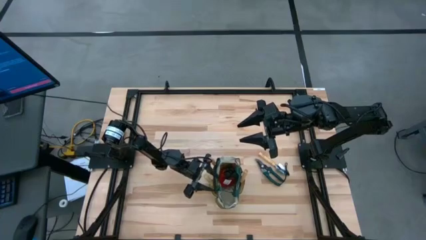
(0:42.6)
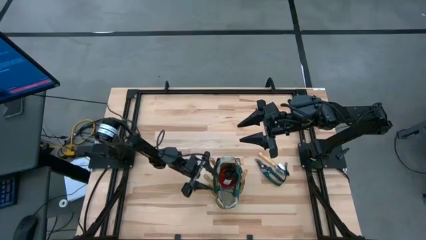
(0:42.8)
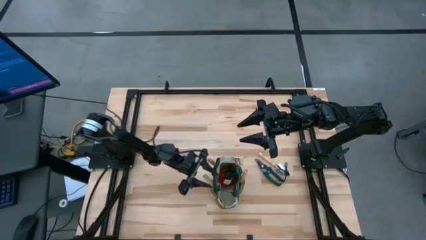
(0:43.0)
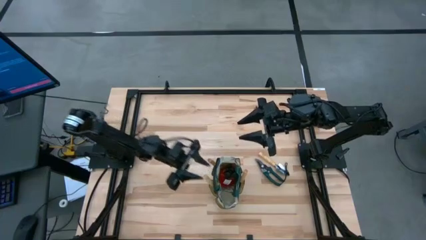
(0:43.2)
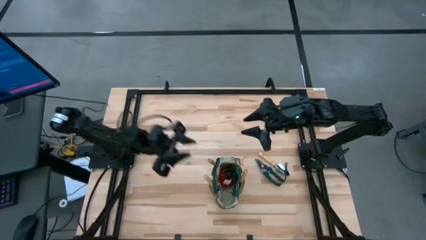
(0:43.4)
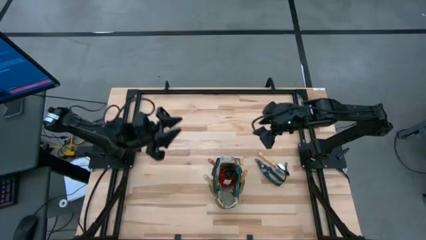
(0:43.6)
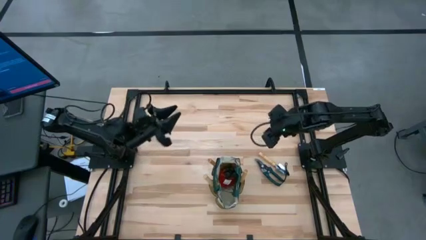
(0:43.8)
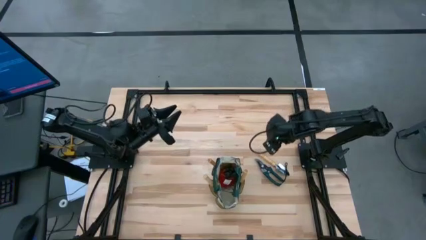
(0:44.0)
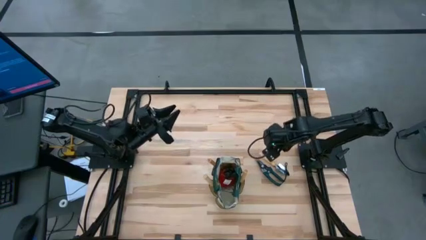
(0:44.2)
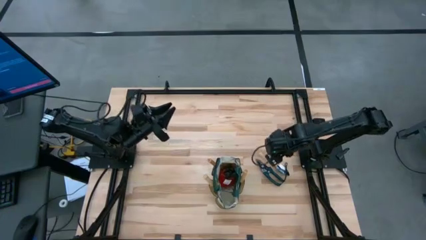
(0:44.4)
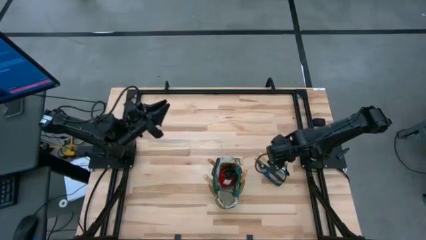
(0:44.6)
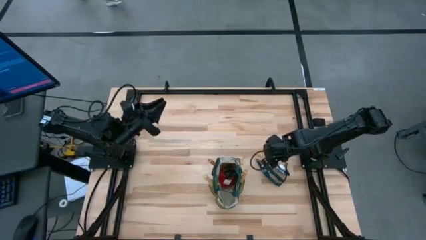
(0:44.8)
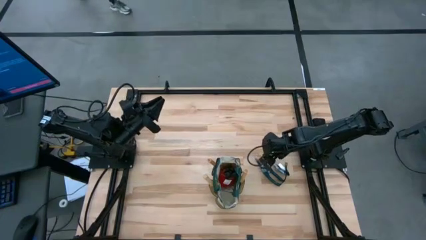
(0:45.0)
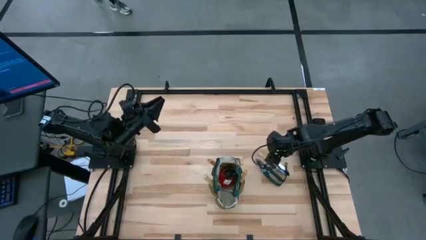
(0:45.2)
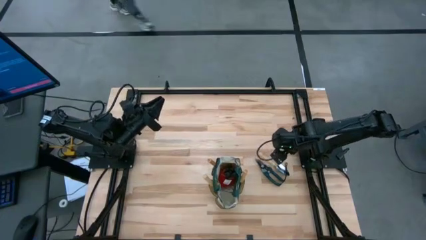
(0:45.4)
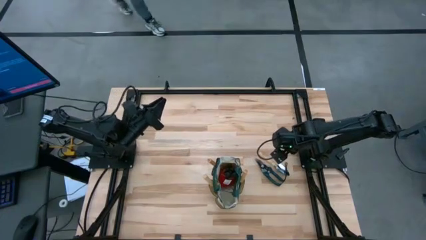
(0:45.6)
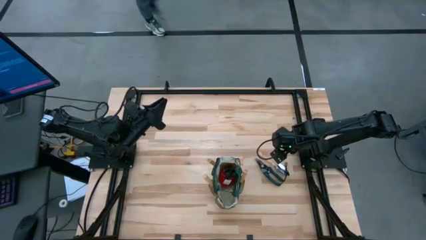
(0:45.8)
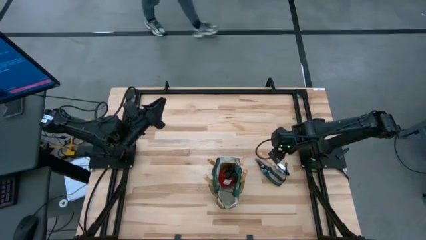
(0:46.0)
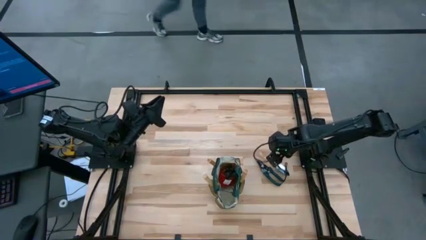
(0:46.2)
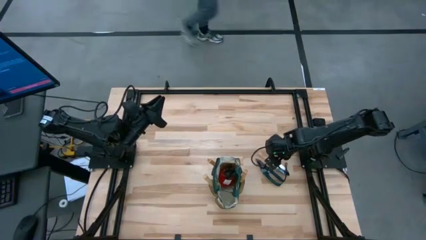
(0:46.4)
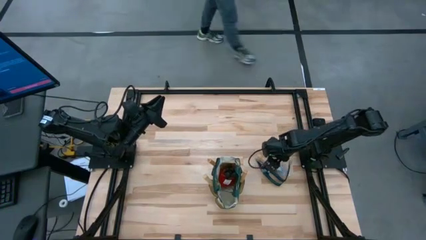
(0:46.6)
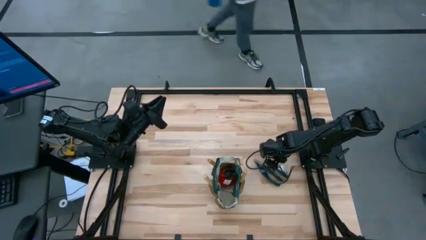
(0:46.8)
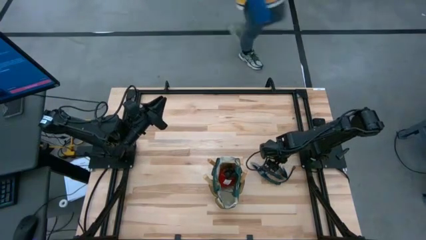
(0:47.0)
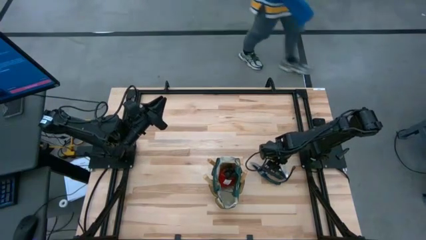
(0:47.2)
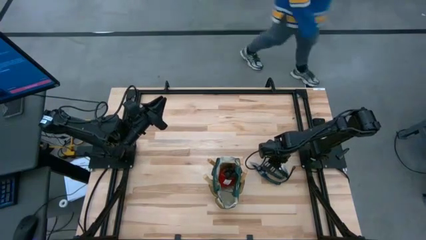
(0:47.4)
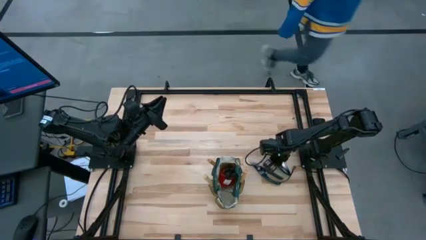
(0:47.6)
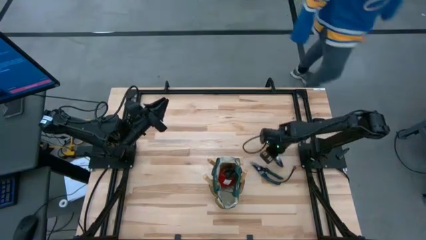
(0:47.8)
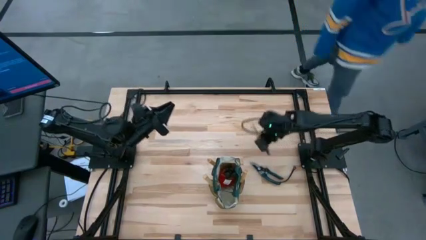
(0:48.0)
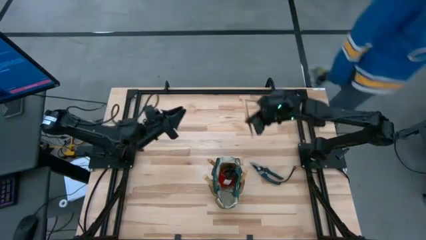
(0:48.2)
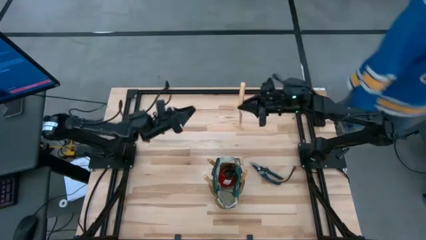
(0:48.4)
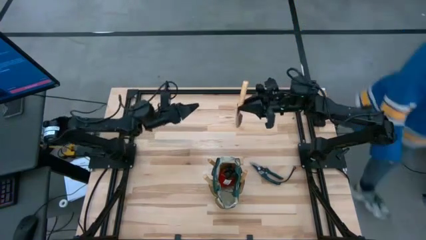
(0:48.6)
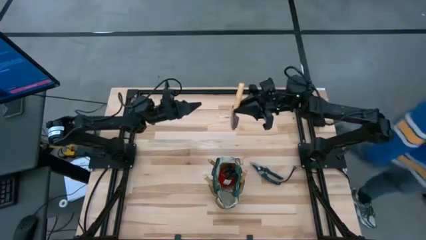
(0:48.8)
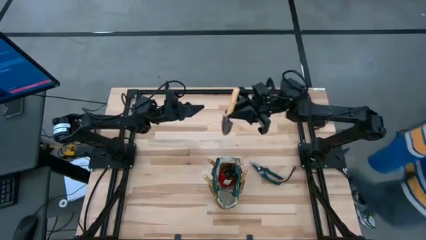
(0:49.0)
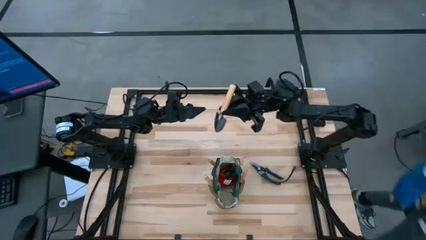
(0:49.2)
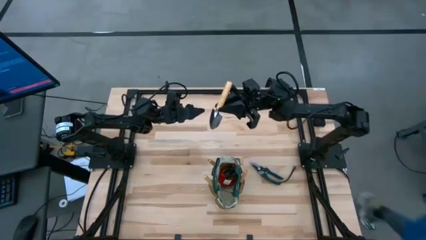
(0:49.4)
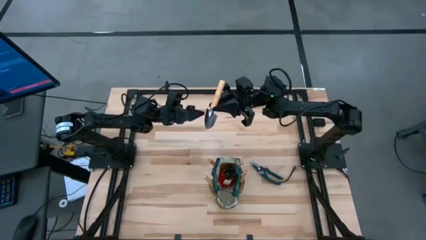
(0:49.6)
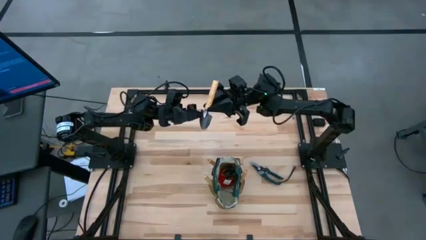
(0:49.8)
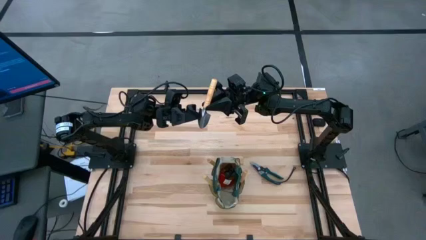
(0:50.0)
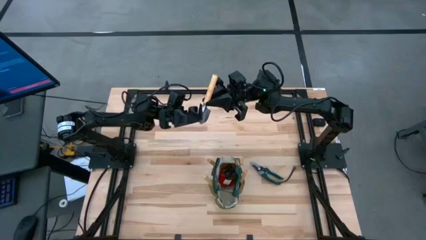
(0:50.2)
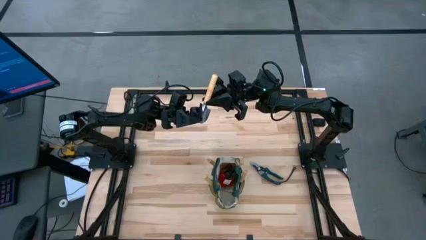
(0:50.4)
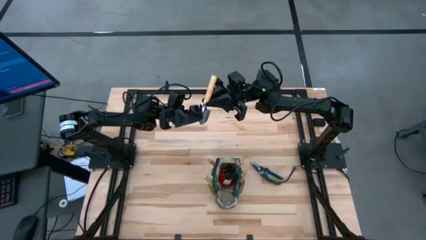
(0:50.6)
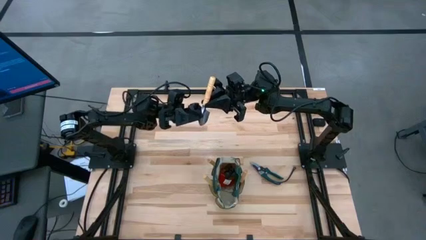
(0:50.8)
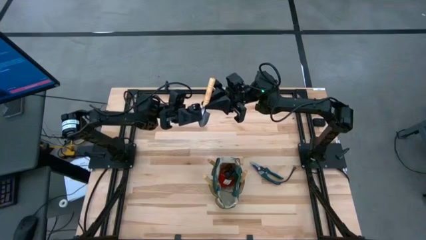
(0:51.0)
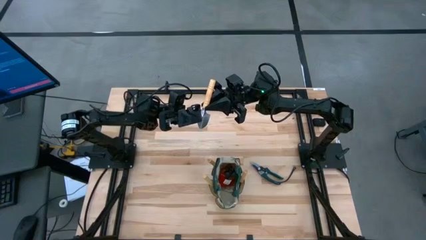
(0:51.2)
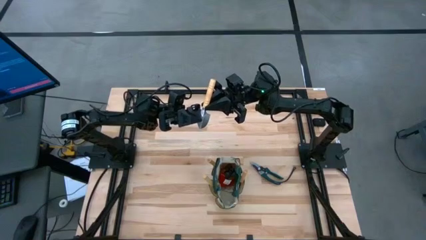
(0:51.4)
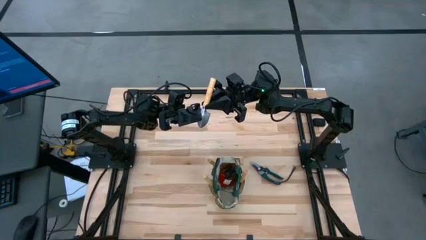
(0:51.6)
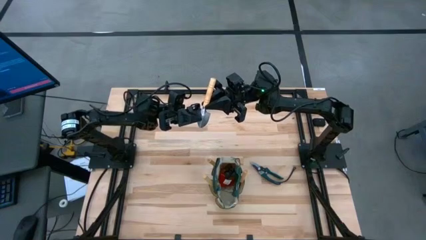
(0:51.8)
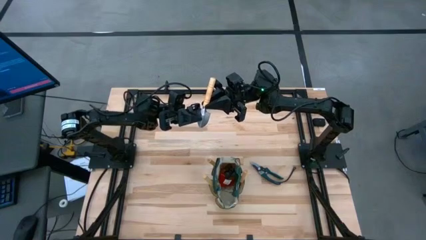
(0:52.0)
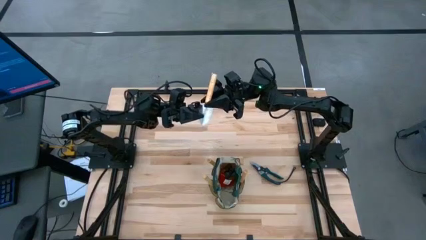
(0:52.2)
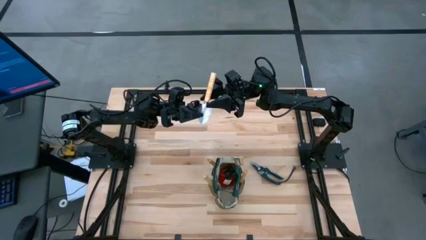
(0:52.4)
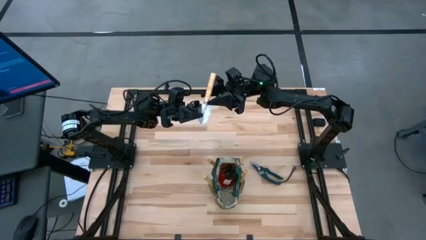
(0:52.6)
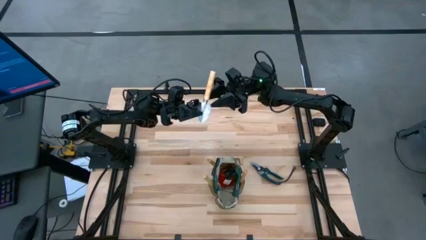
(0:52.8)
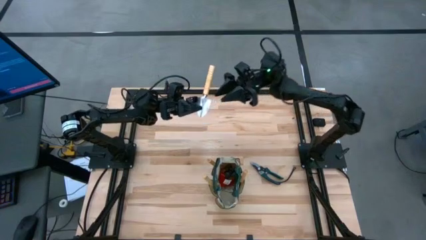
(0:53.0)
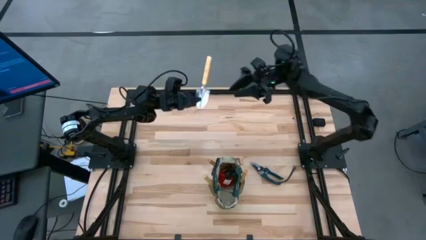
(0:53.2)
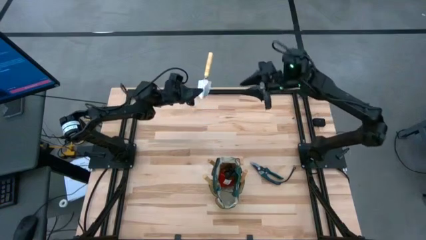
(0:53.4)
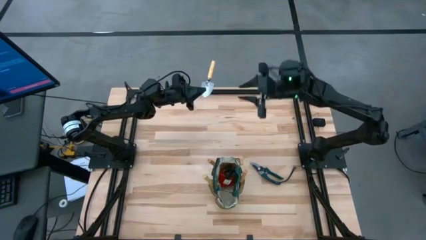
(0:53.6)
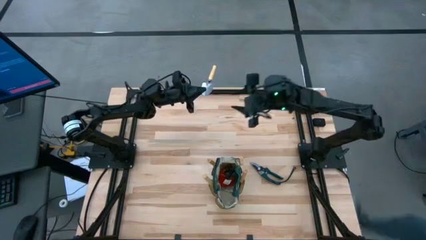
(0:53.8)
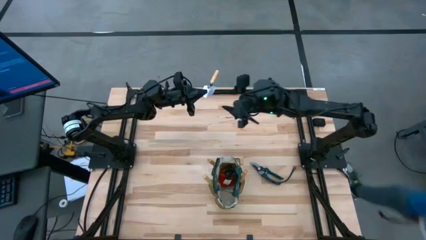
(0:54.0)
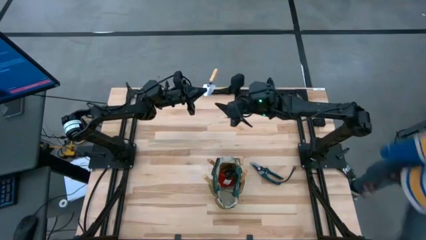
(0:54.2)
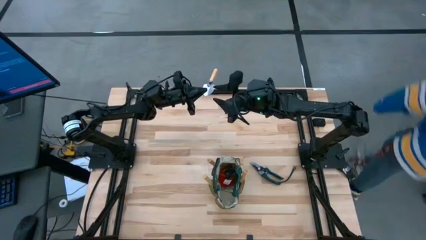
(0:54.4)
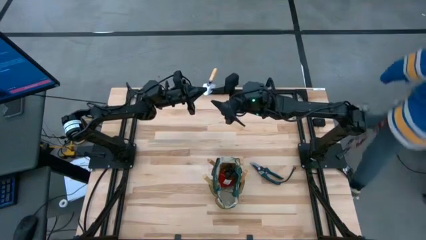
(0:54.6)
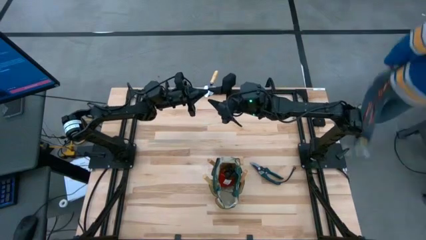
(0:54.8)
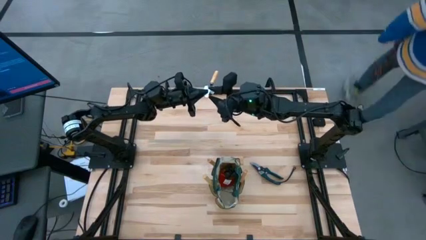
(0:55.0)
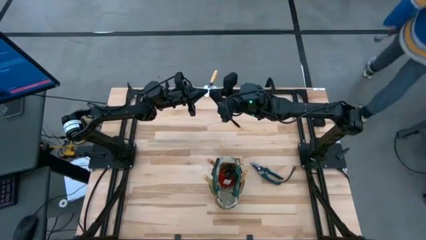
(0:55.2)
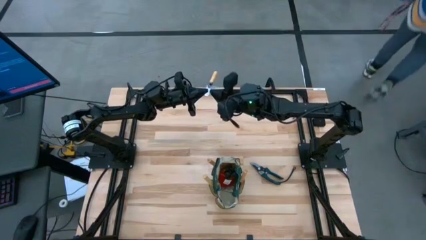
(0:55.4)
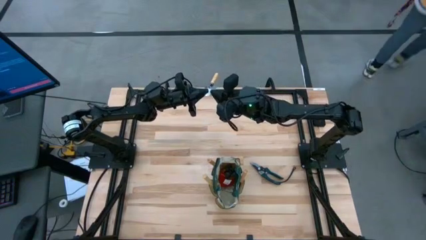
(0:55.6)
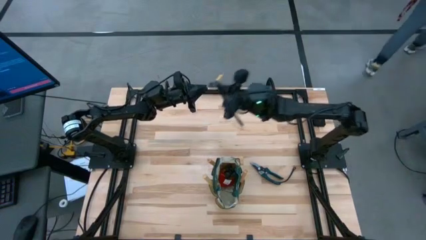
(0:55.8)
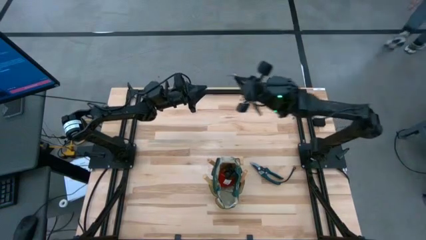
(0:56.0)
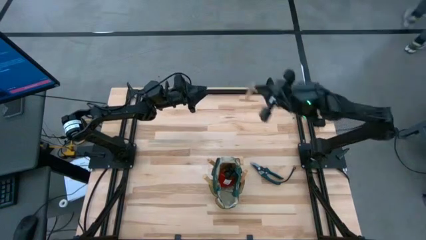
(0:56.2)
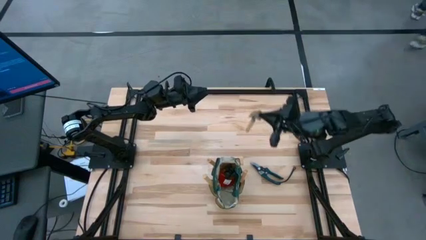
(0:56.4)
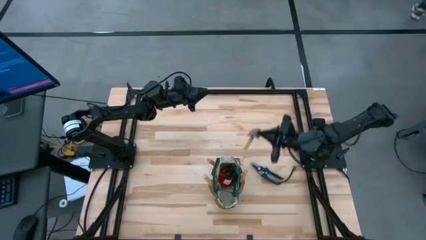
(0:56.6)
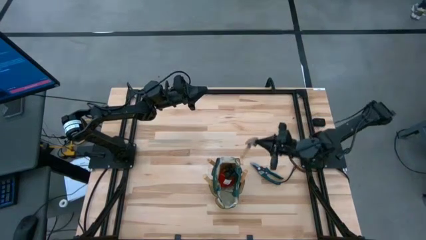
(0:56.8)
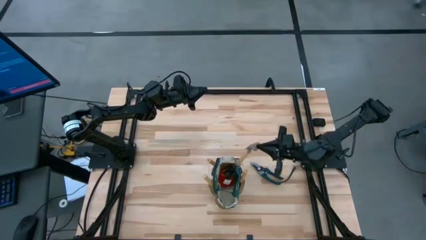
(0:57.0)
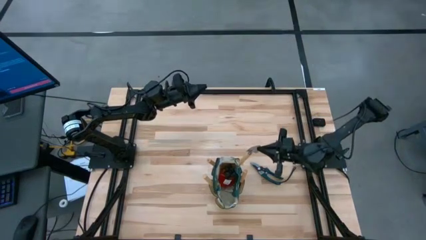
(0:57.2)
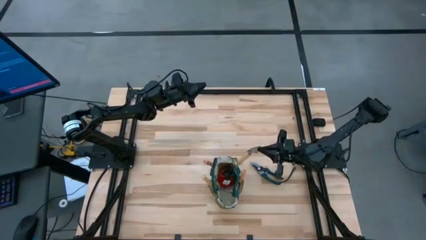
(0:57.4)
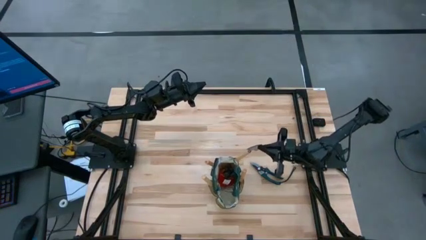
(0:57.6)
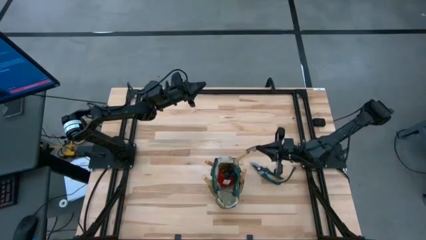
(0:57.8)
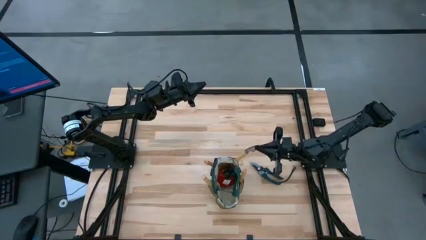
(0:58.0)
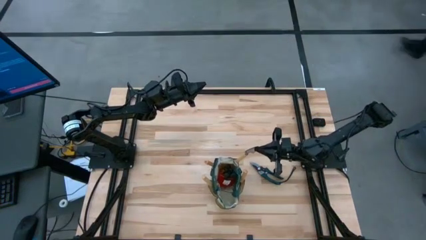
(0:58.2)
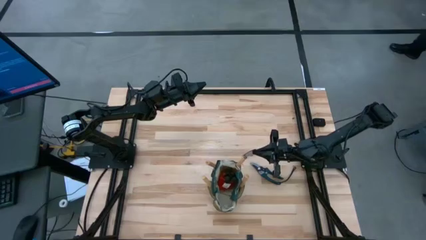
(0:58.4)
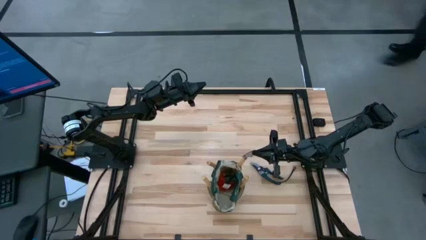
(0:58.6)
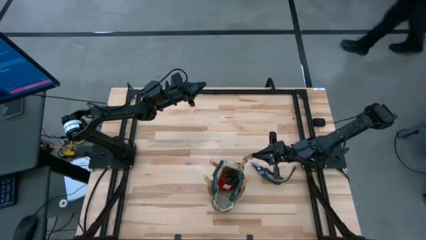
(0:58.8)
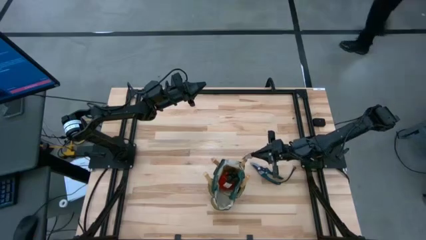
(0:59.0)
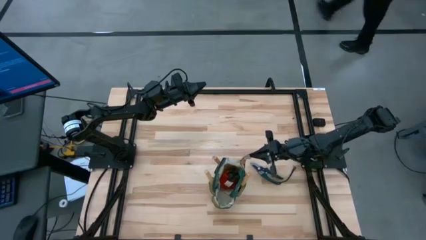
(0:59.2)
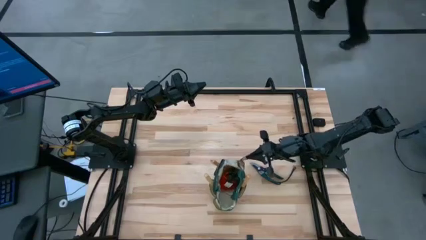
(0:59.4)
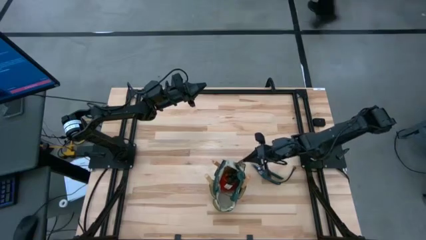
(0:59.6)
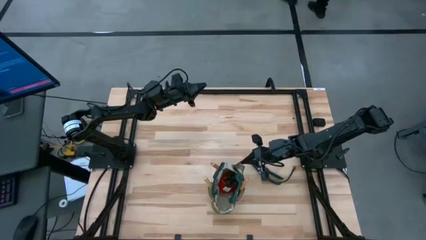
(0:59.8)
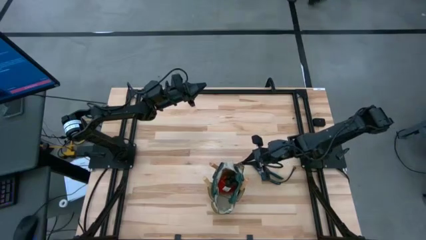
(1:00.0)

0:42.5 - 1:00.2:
Task: Pick & Place Garden tools in Gardening bag
Put the brown trowel into the green gardening bag
